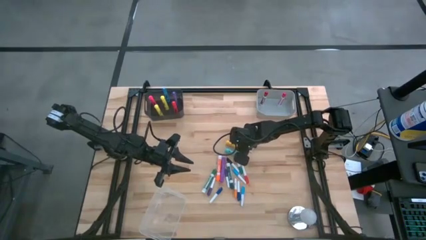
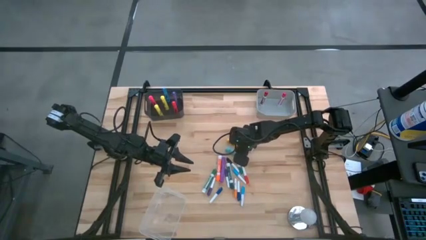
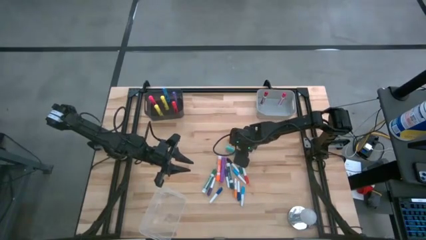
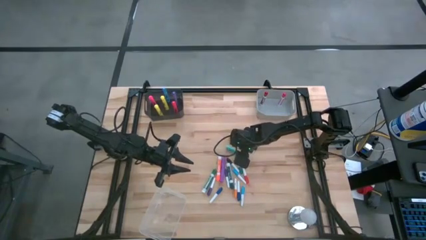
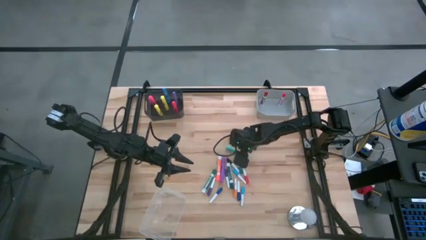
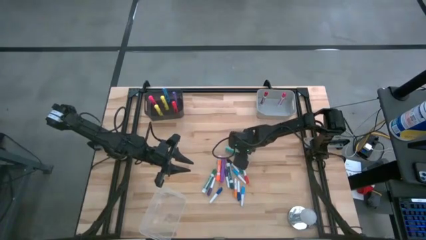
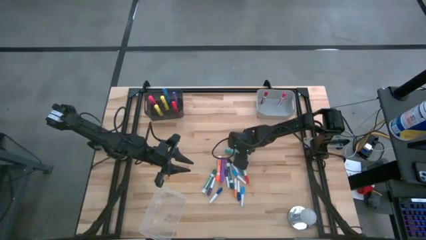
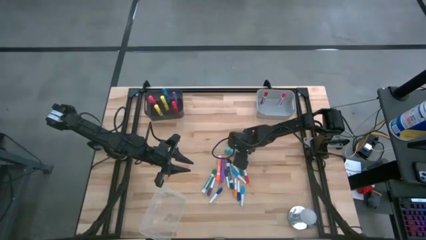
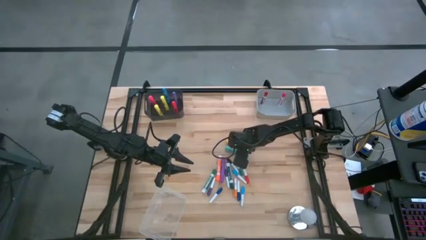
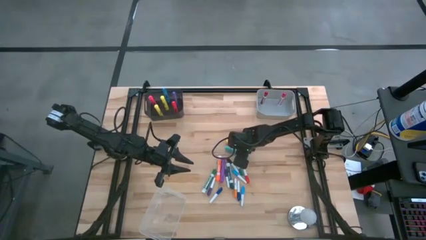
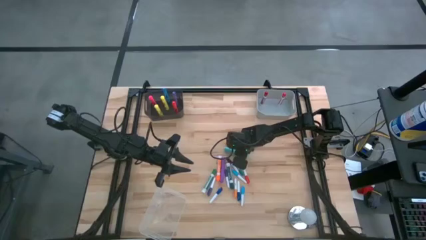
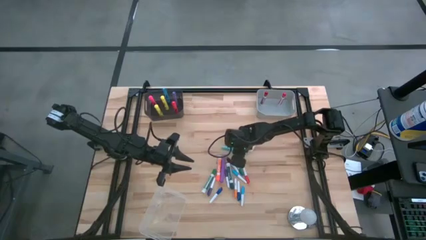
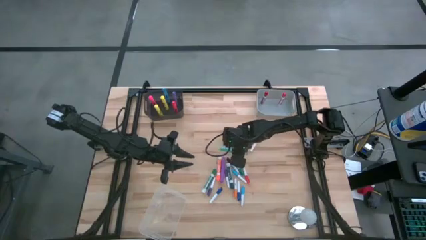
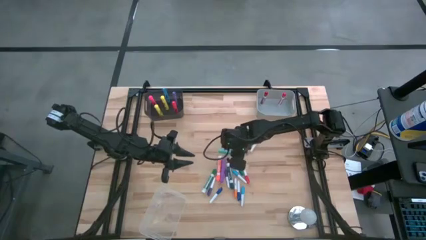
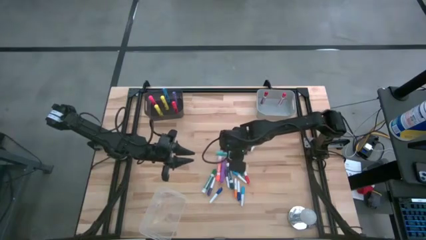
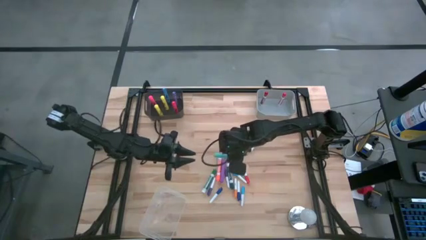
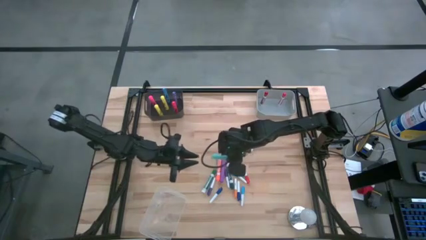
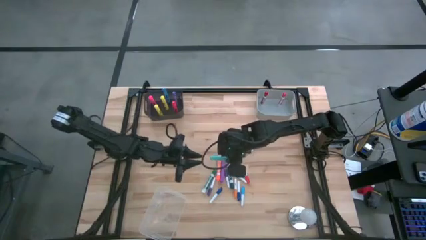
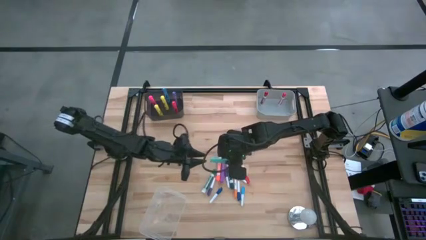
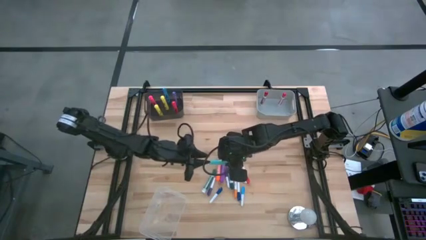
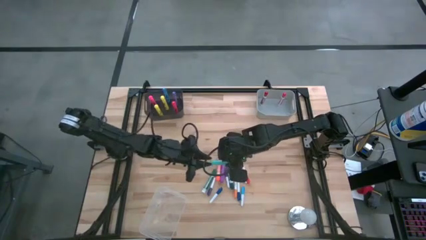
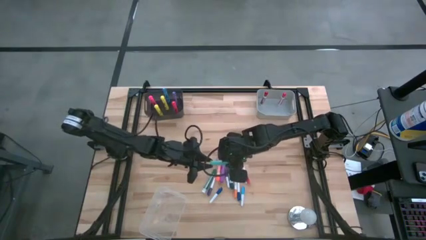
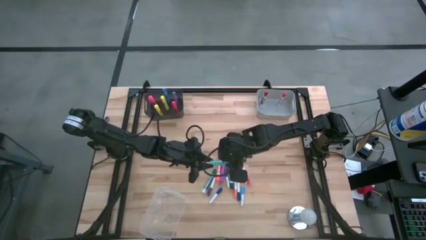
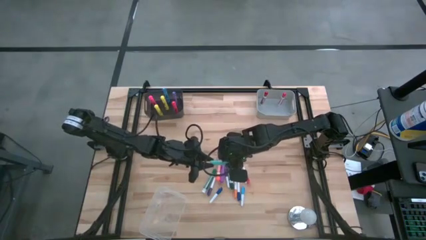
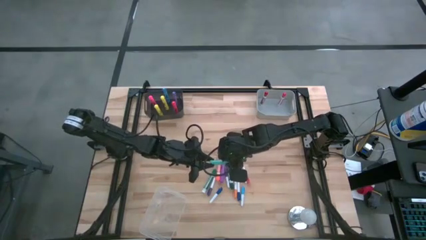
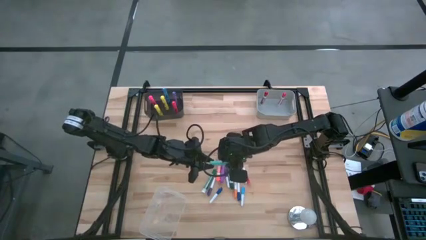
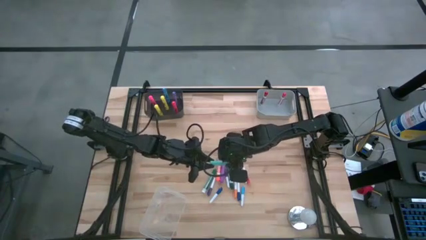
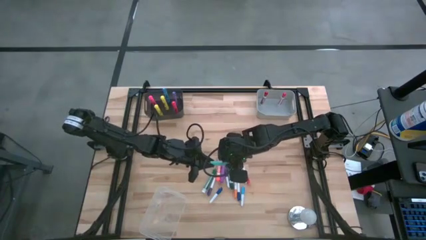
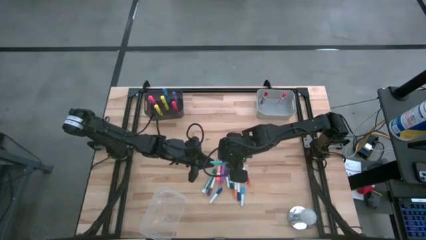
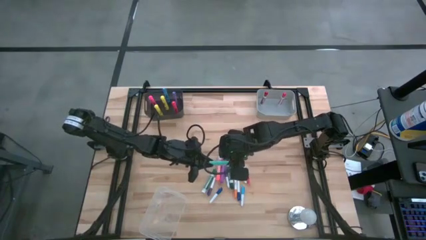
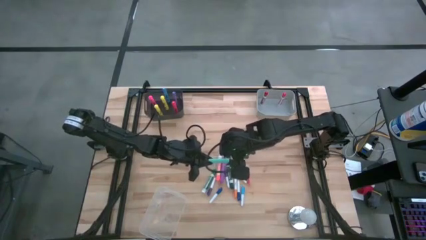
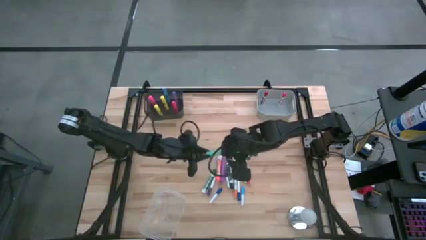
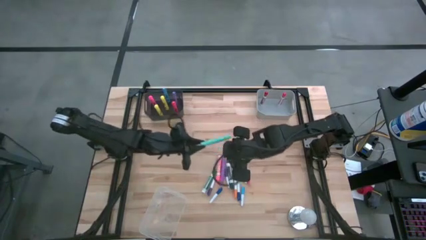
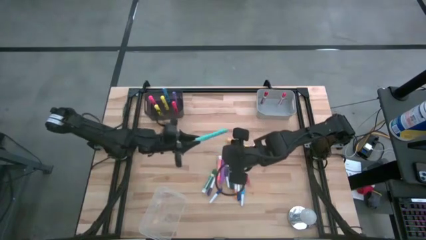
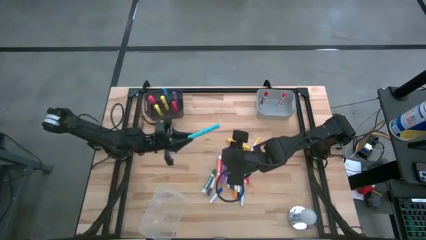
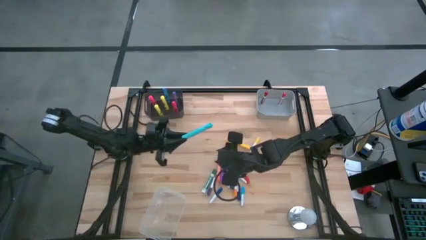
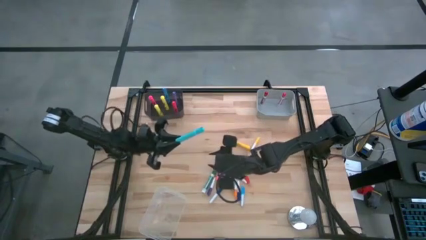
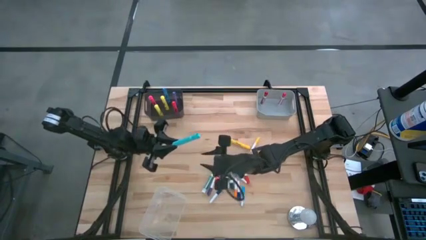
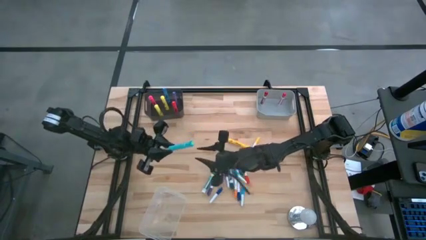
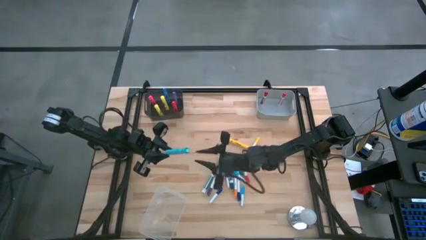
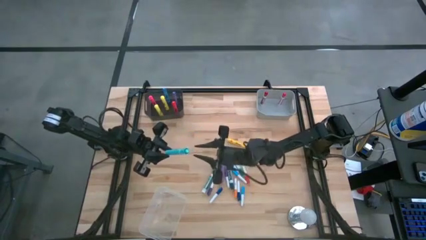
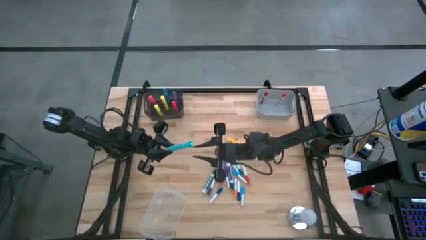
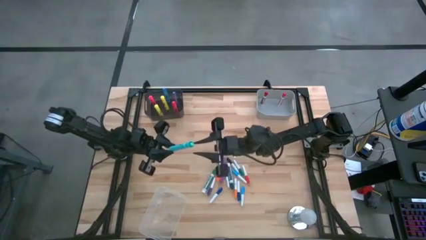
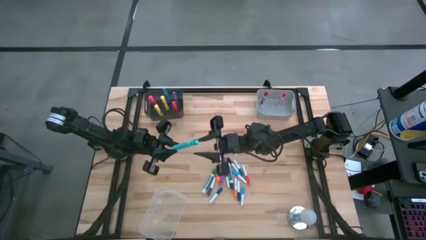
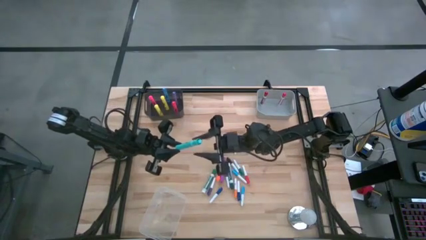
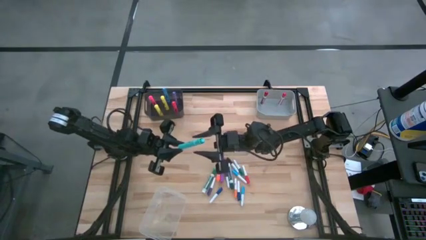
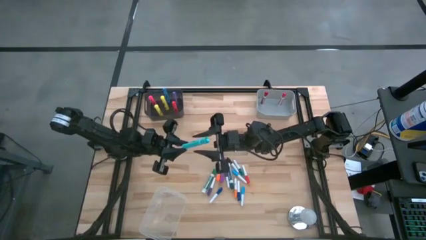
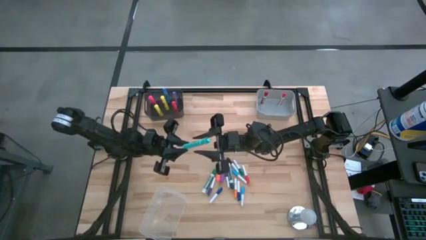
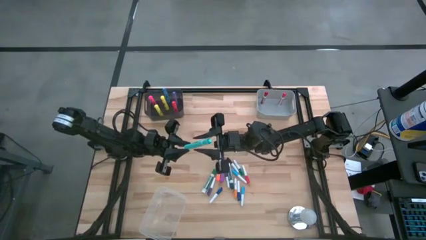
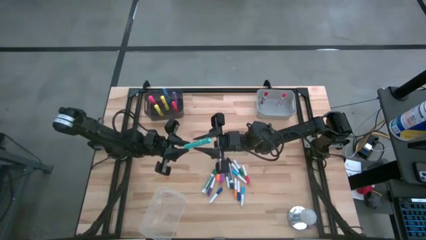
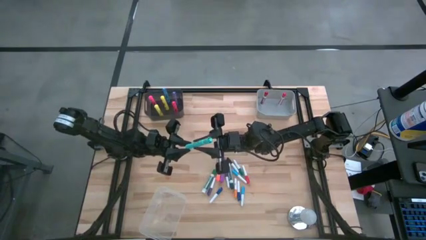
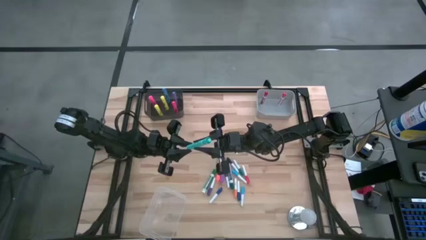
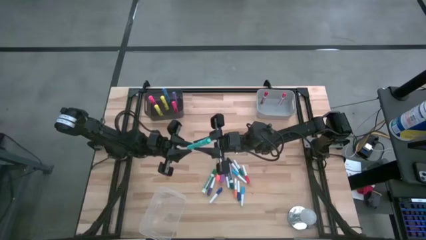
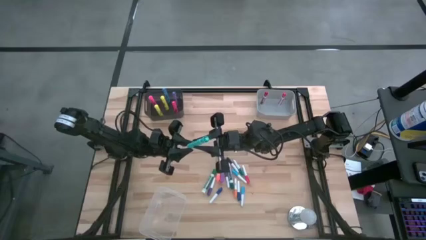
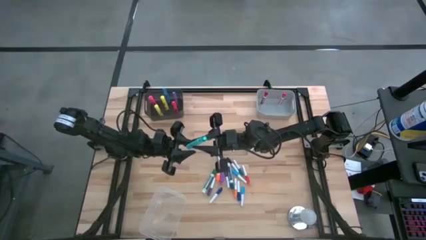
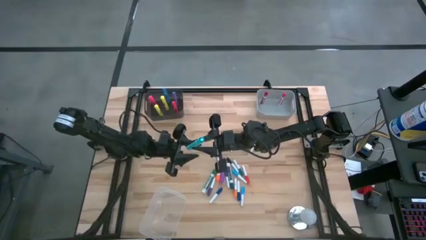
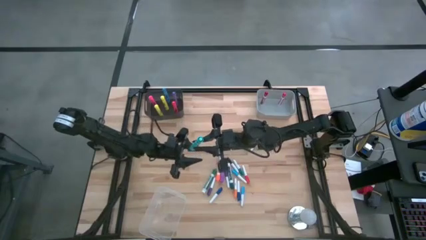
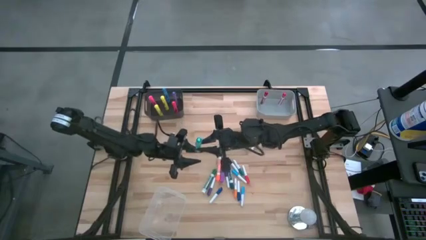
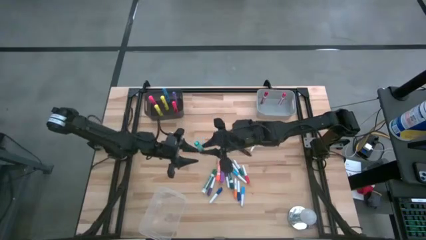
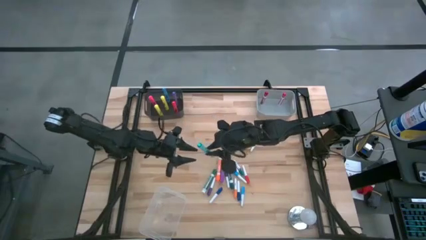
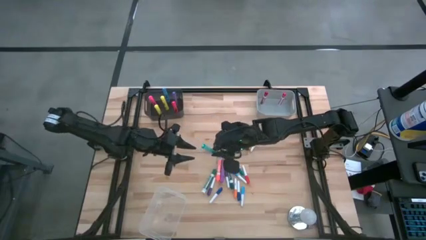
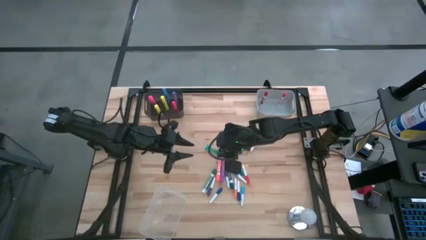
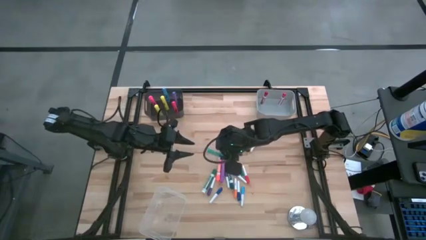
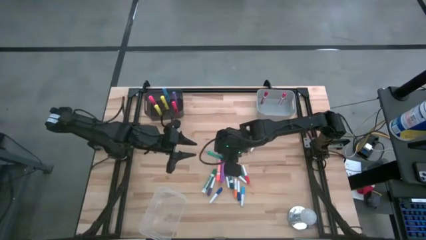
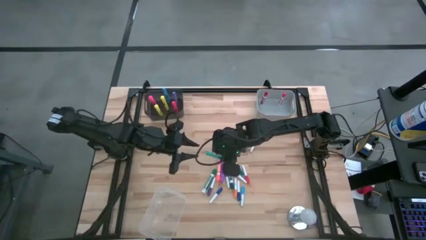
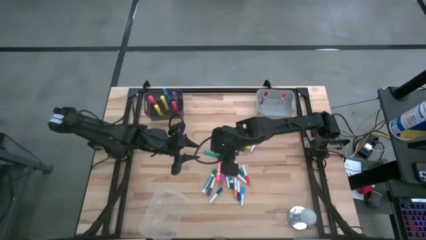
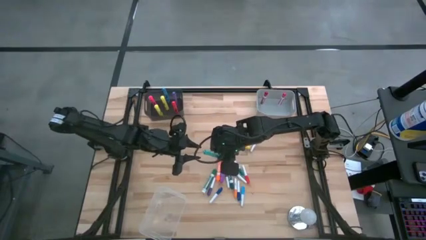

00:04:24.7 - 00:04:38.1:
Task: Pick & Place Markers
Put the light blue highlighter pen into the black bin

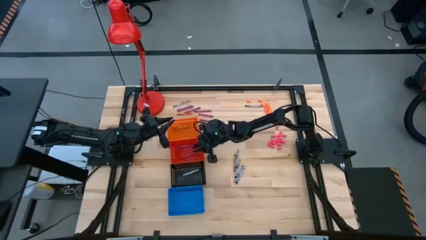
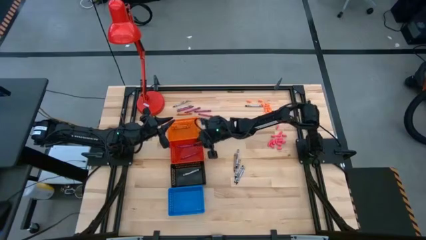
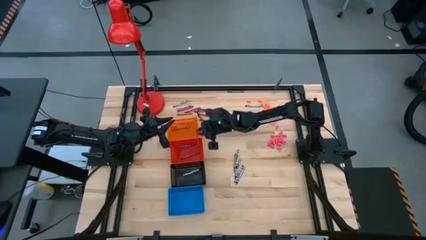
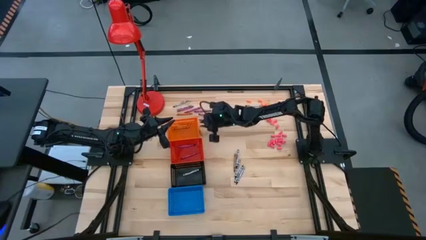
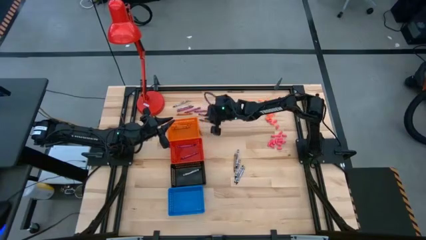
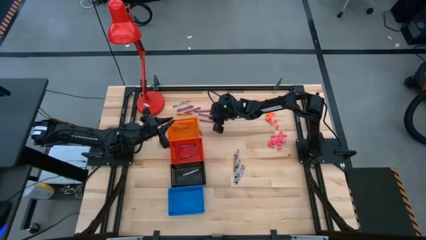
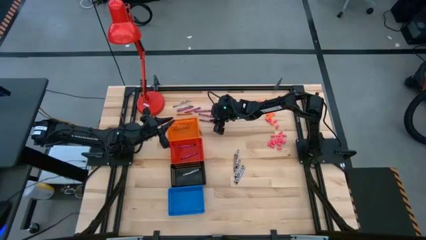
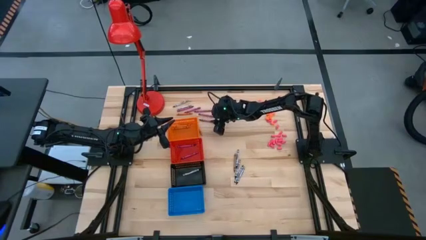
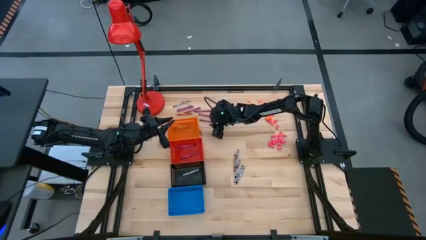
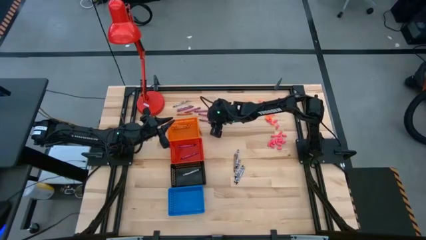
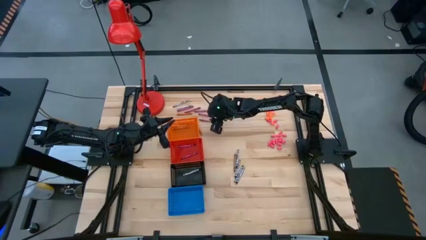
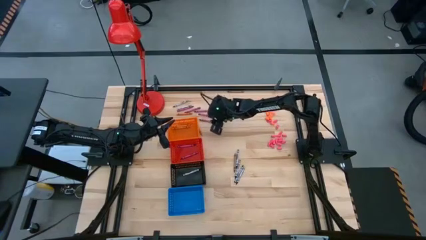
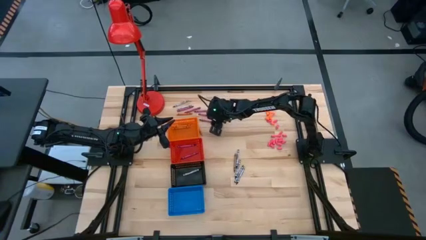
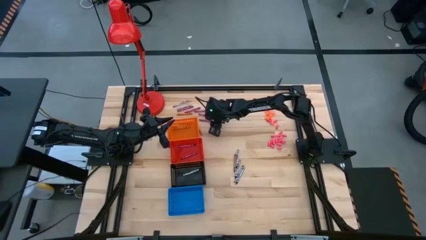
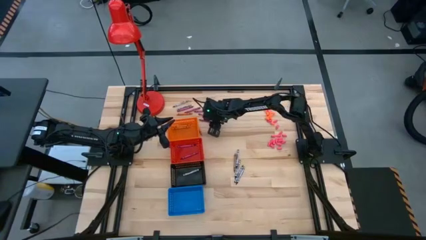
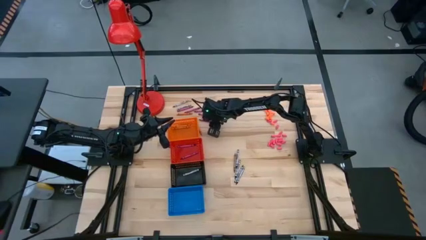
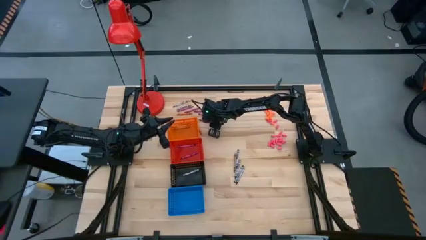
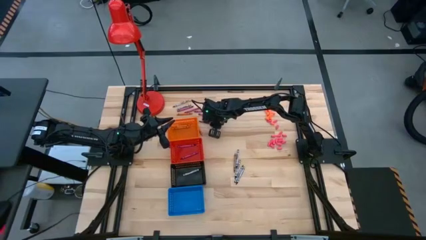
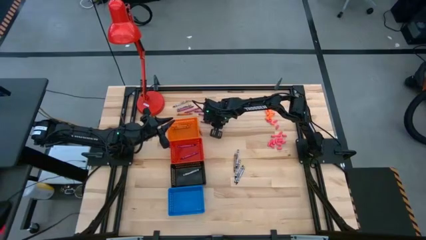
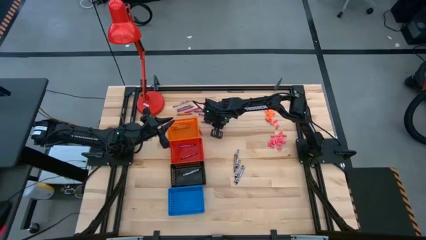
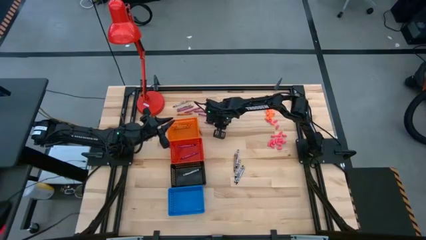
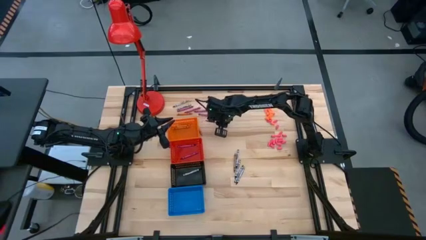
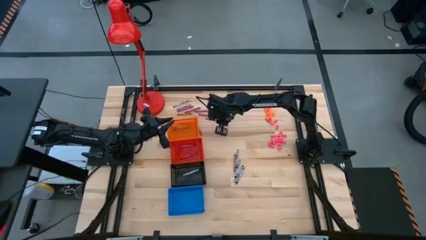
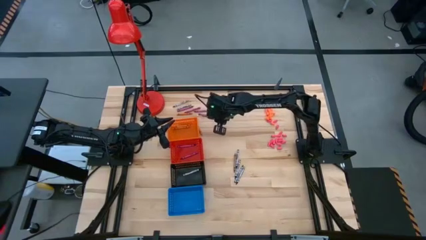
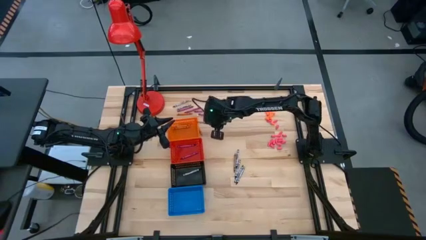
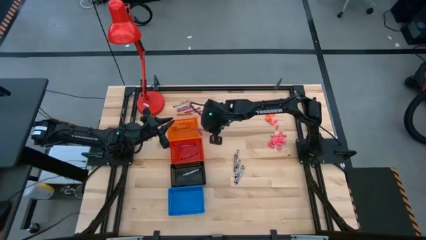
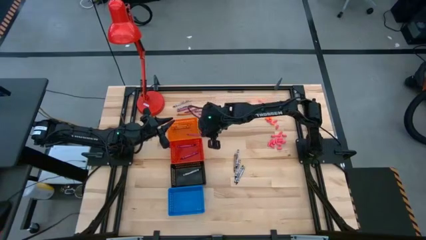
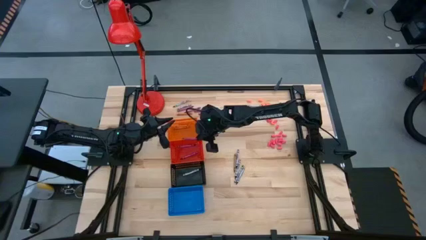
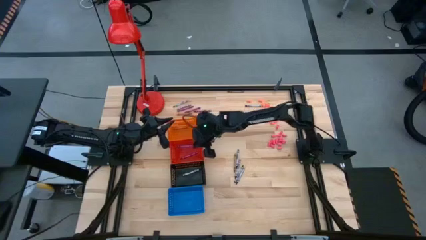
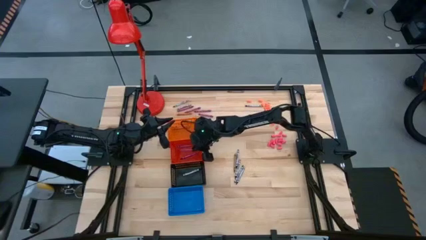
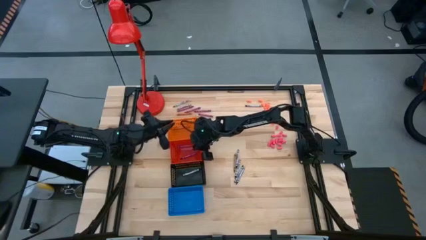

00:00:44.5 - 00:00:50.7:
Task: Sort crayons
Put the red crayon into the red basket
